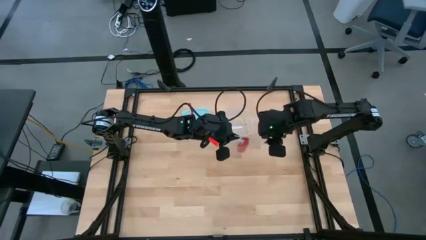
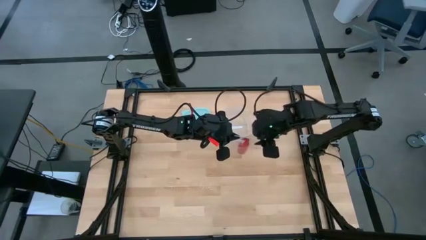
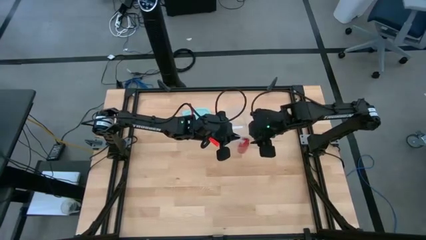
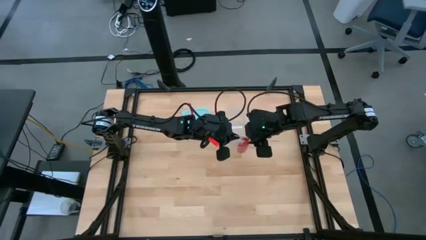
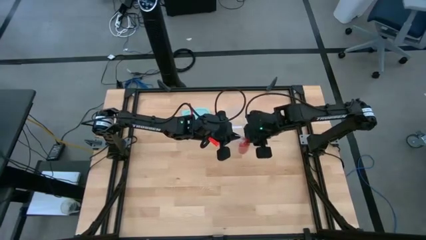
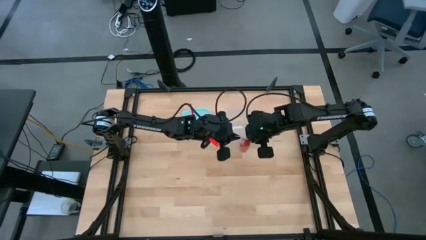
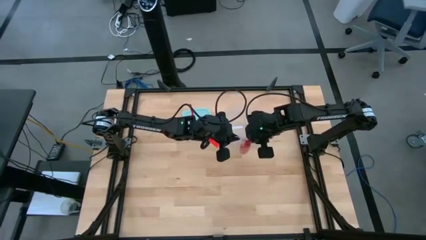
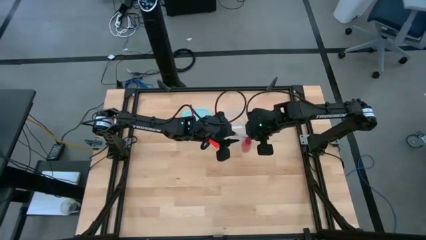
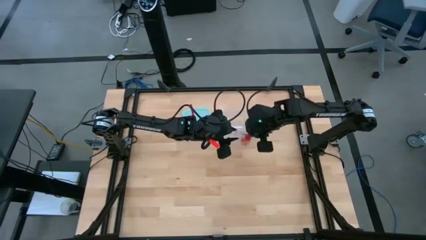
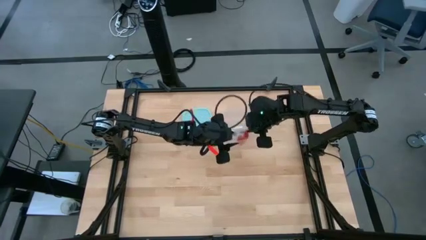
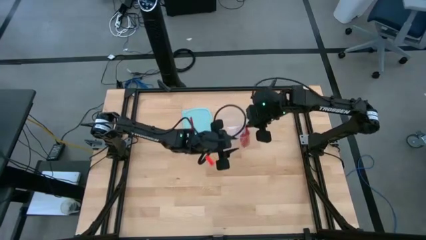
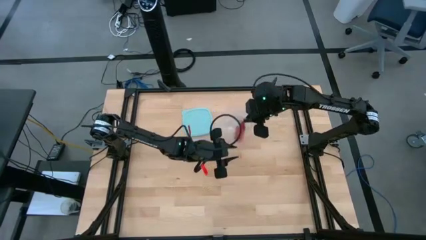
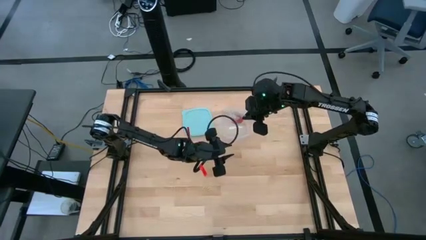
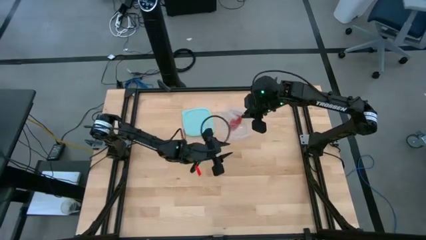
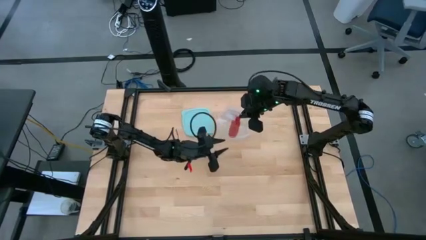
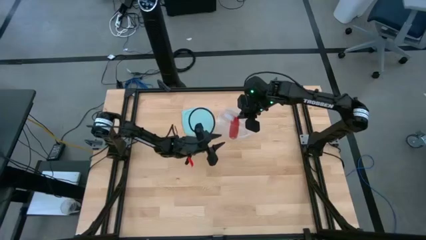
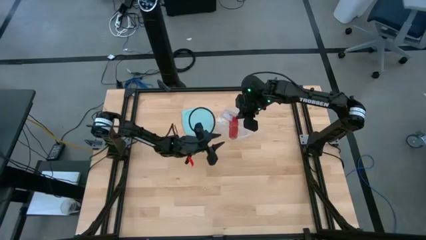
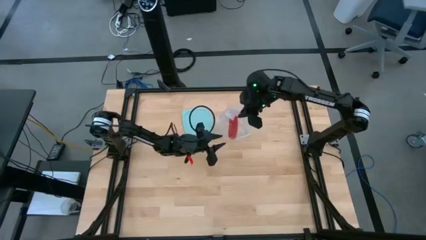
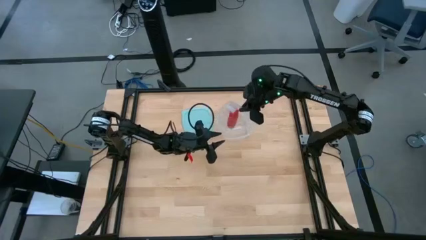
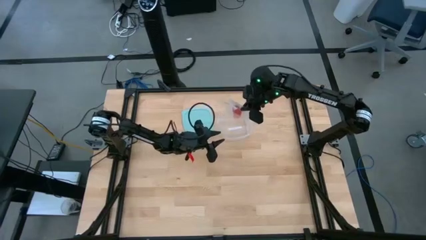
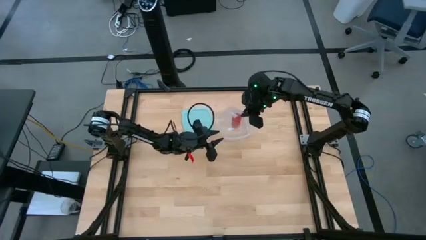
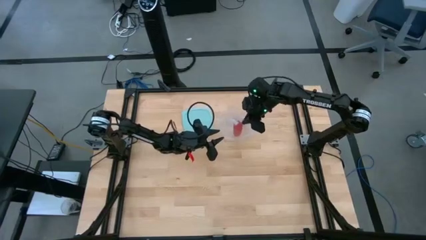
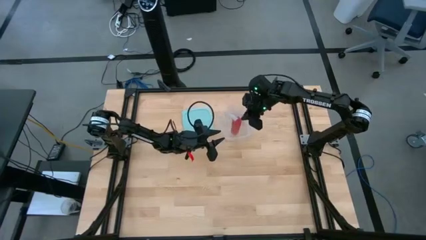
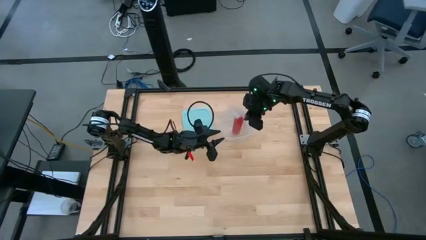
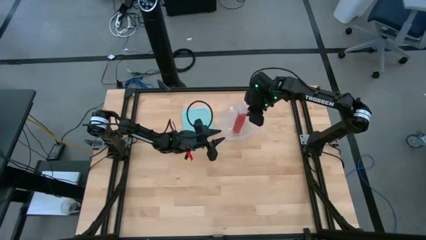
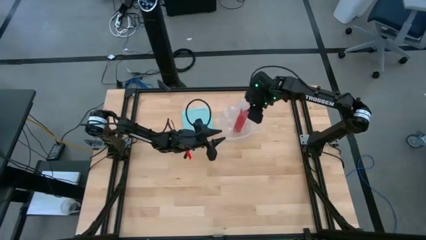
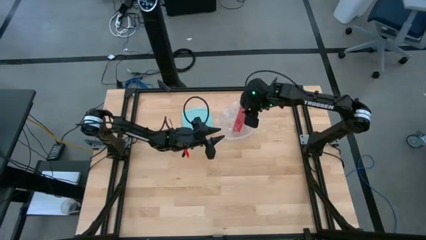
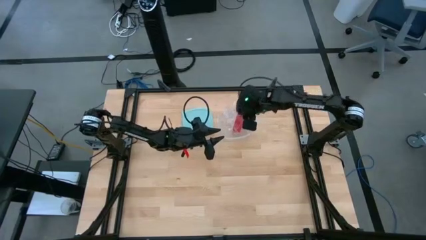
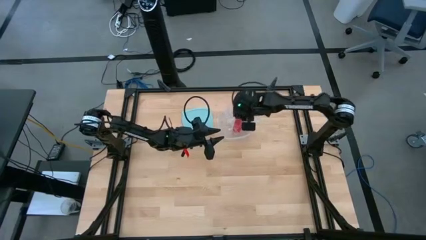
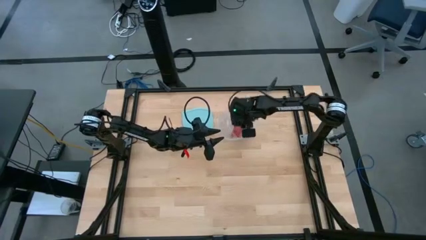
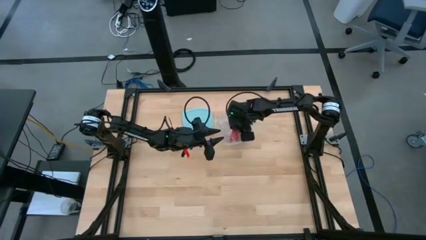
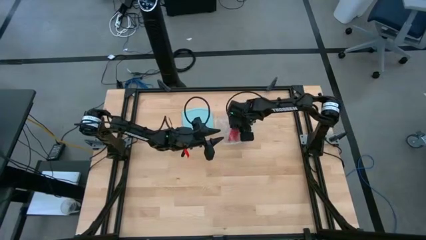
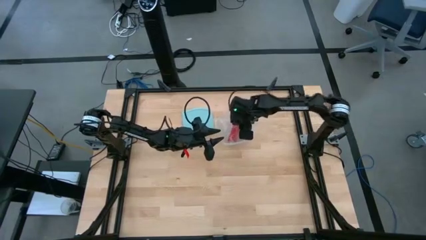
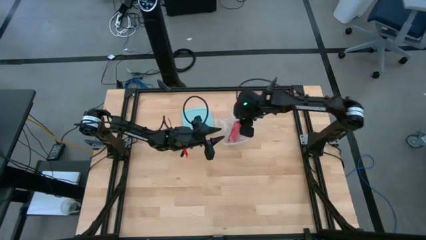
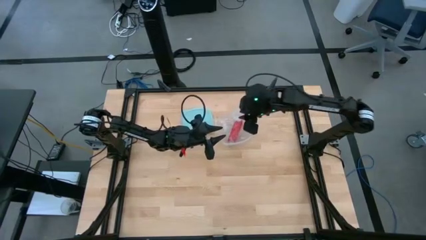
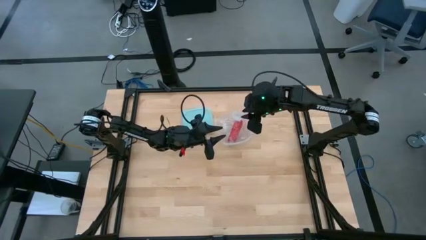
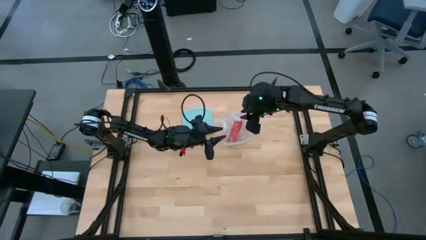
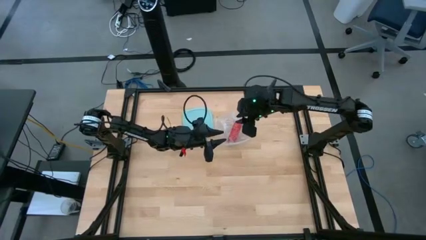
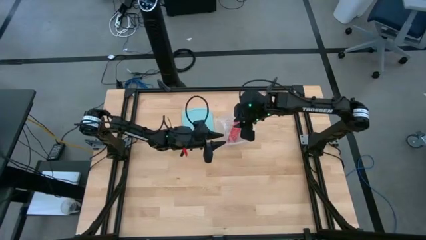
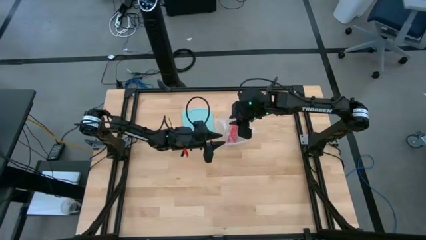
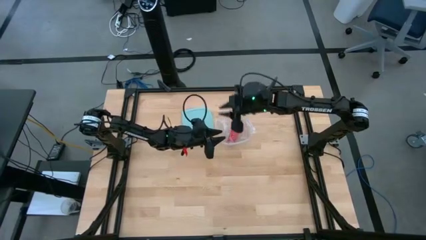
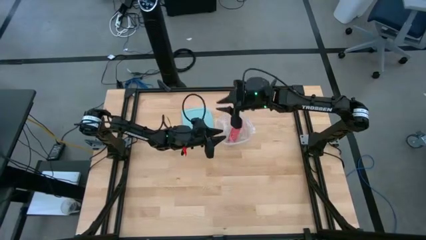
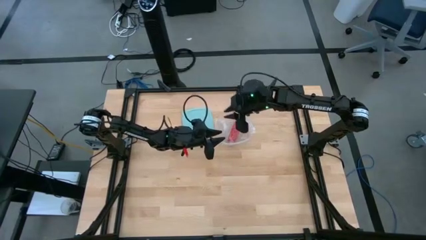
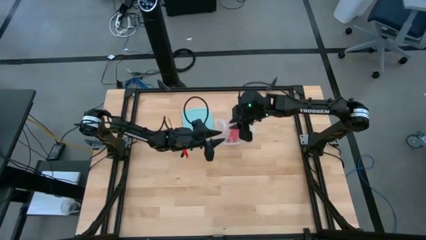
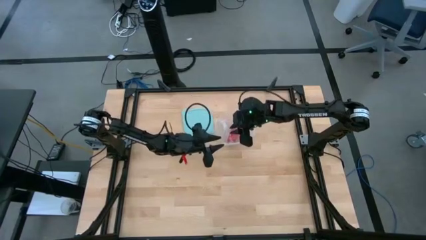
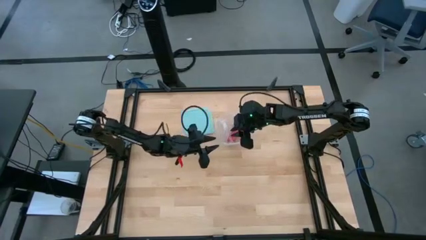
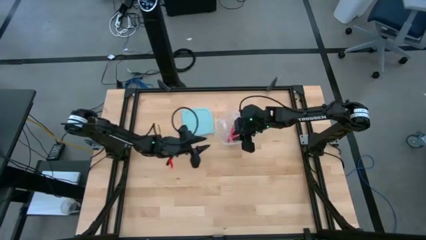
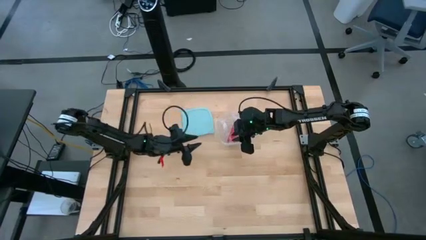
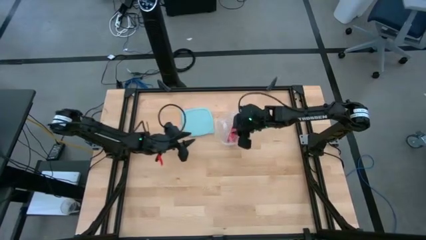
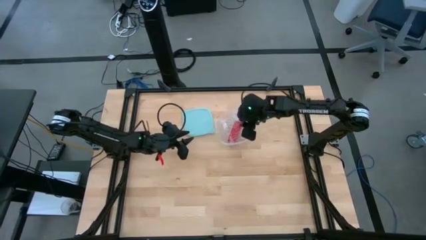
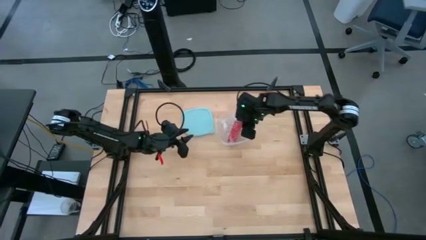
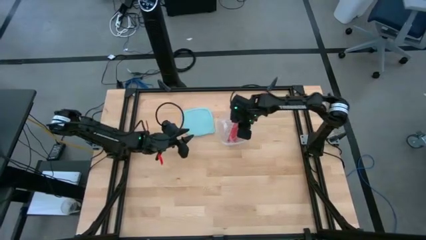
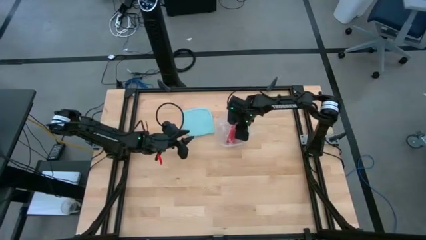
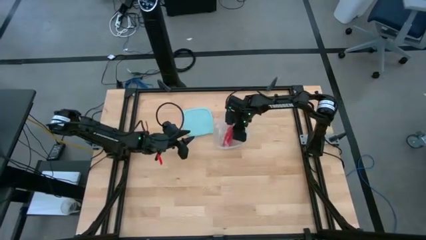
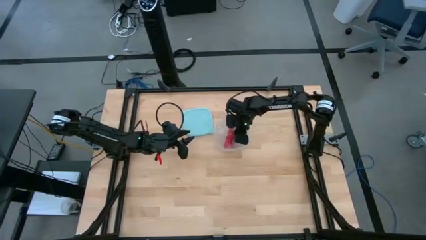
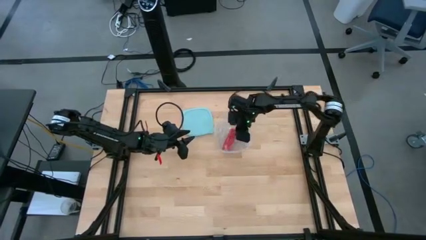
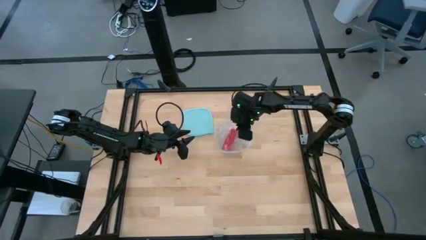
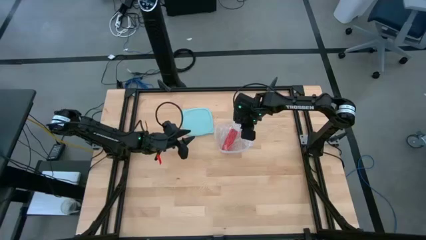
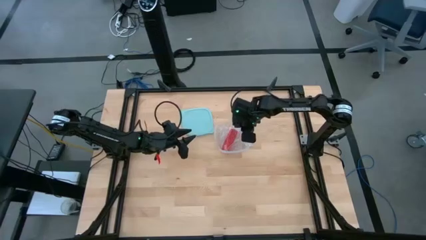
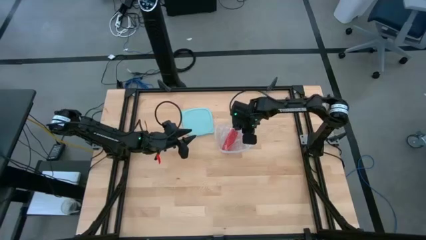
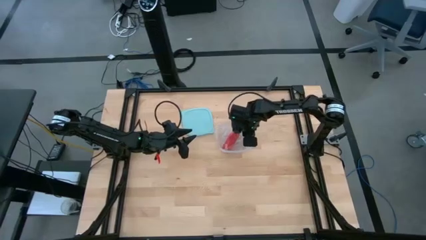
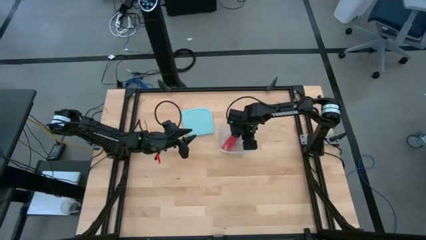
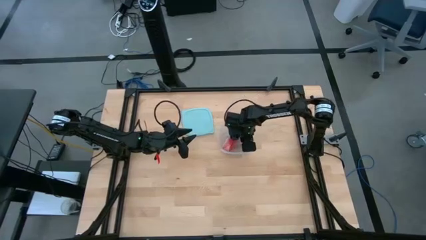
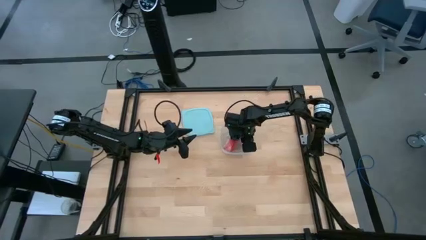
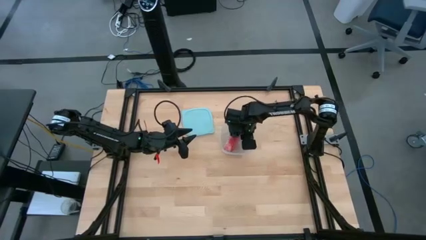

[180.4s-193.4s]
Task: Roll bandage
Put the red rolled bandage package into the transparent tupperware

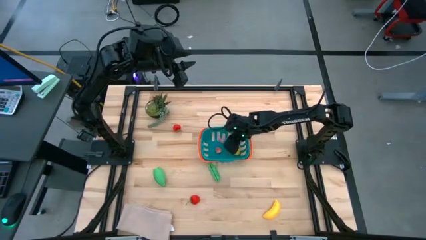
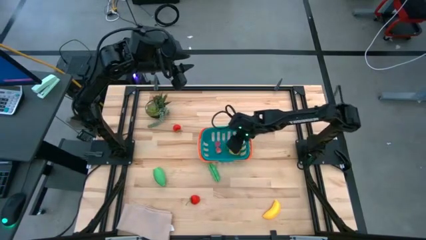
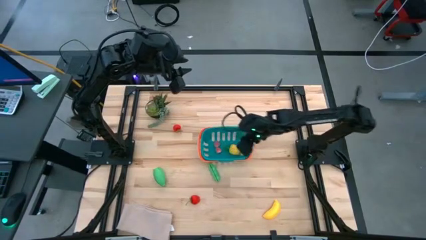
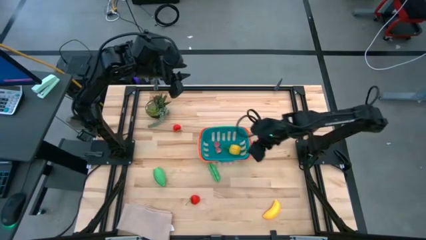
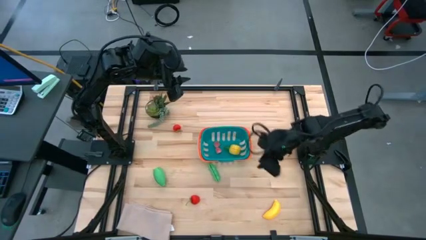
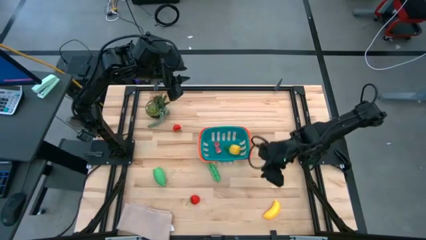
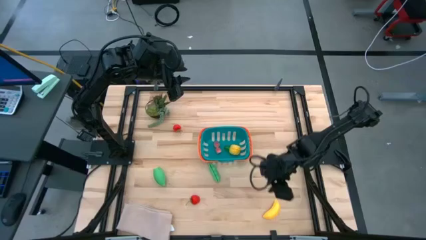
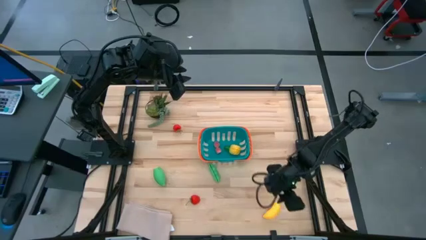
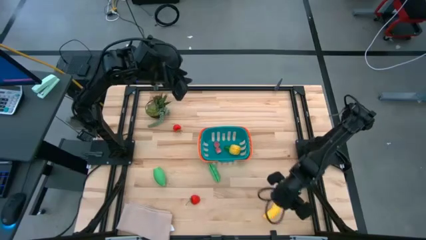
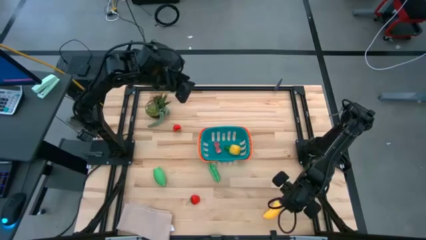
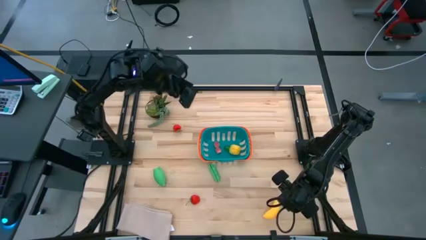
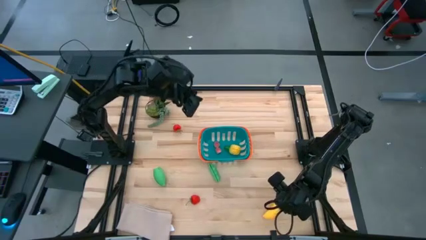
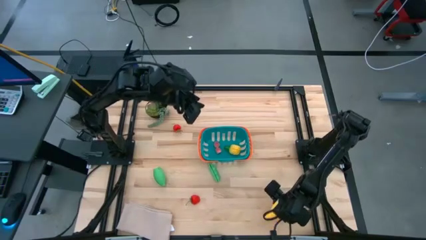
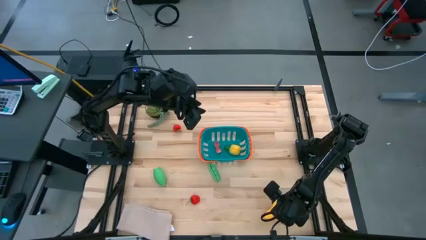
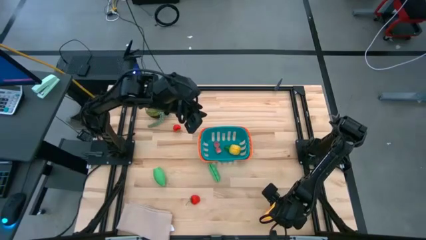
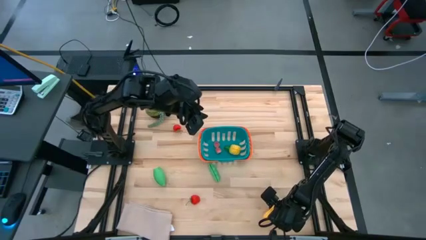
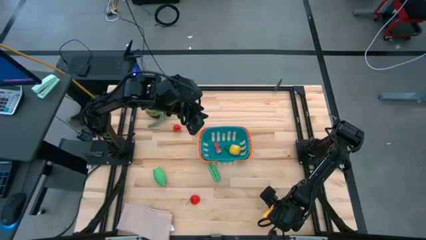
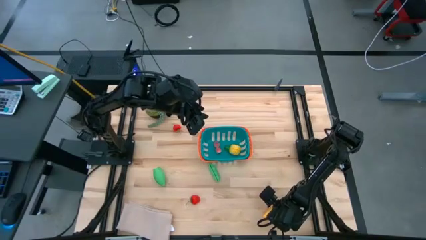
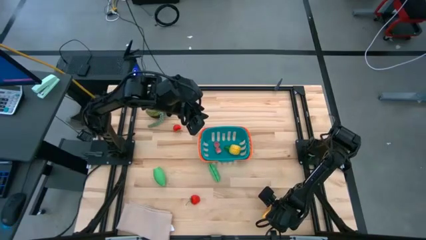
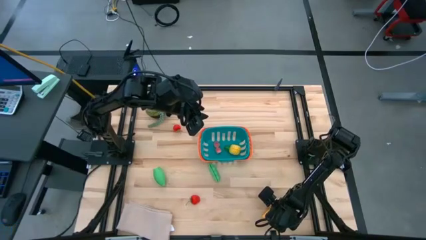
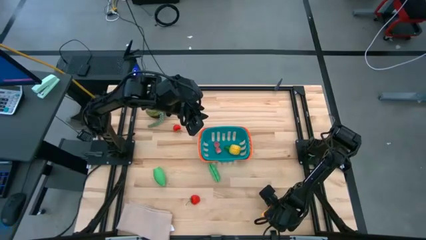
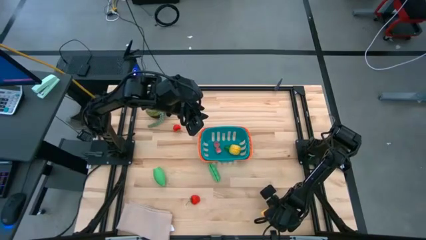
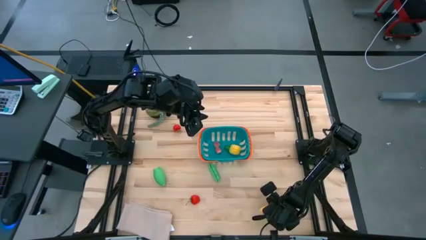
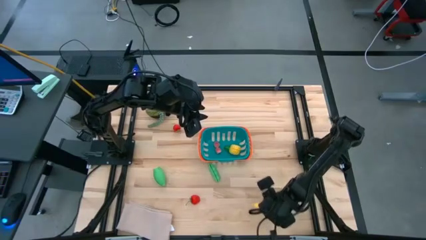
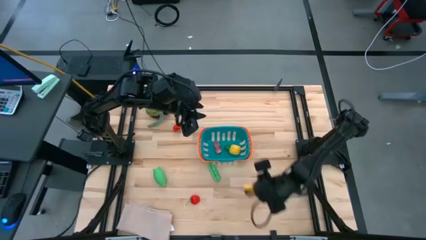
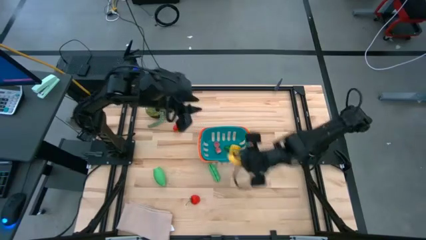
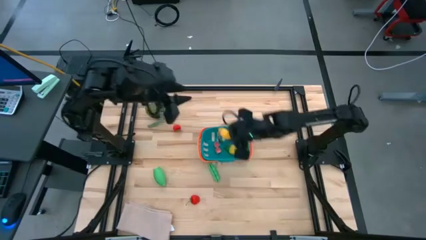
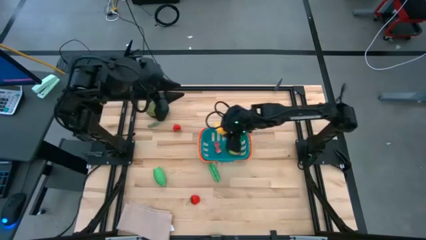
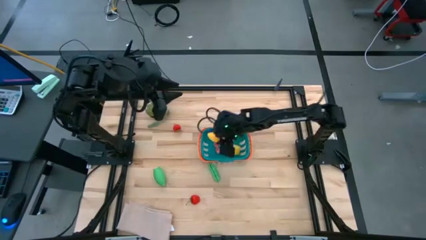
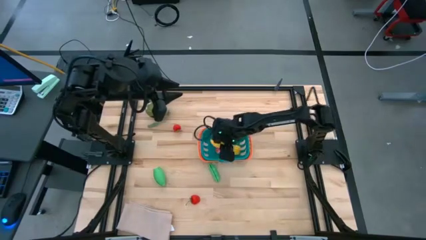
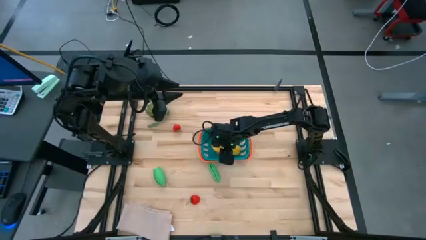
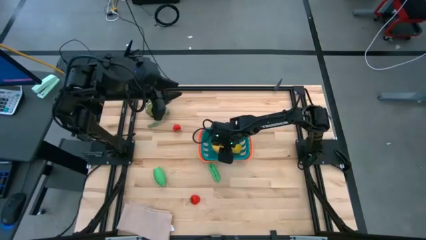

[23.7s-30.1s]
Task: Pick and placing Produce into tupperware
Put the yellow banana into the blue bin
